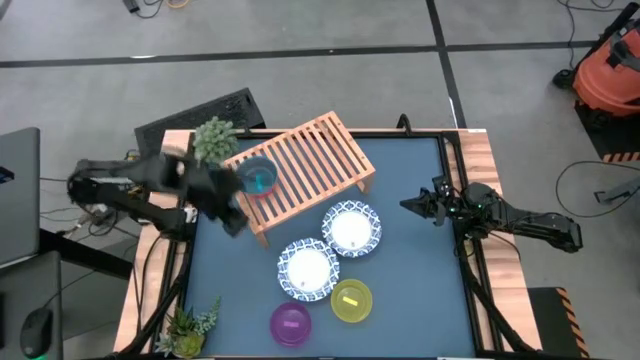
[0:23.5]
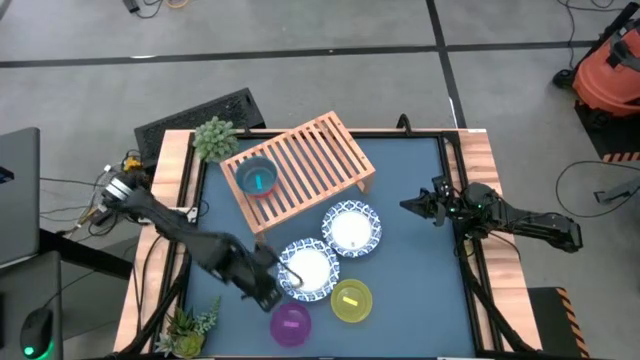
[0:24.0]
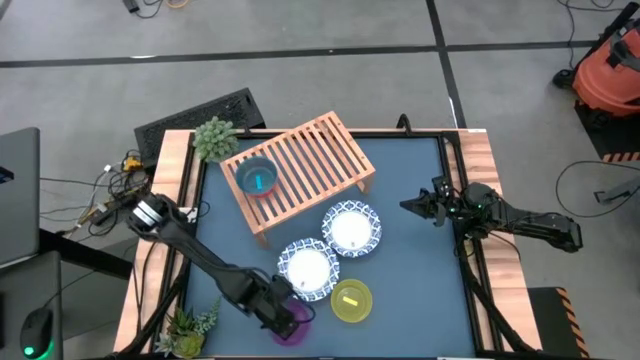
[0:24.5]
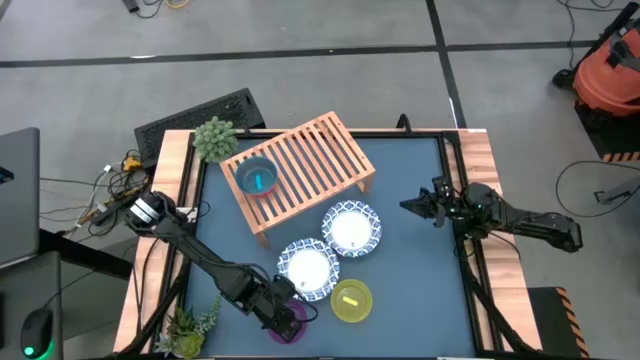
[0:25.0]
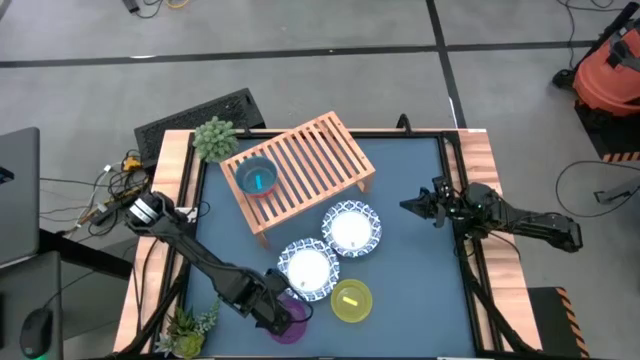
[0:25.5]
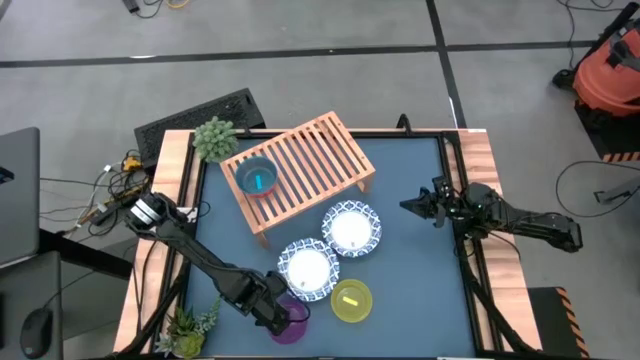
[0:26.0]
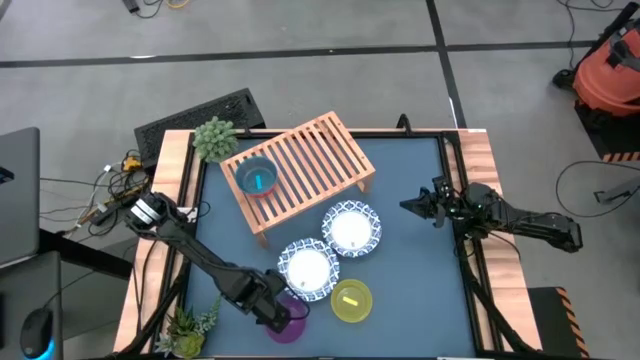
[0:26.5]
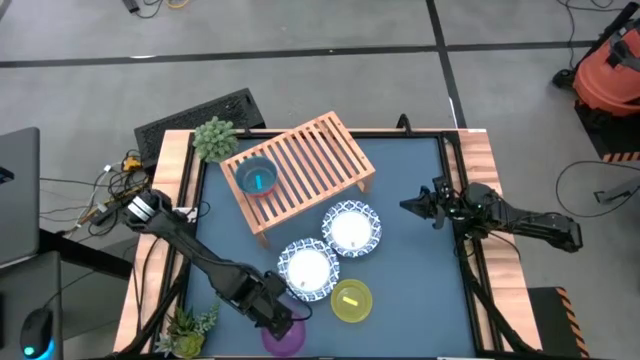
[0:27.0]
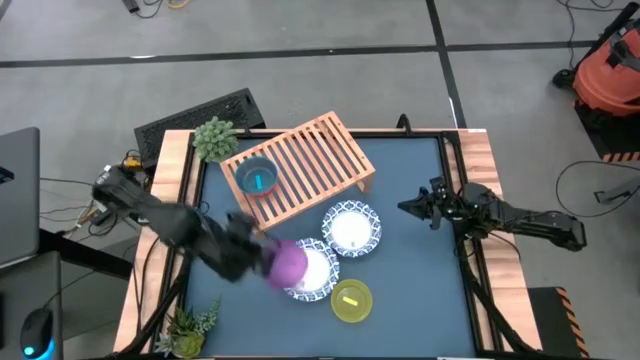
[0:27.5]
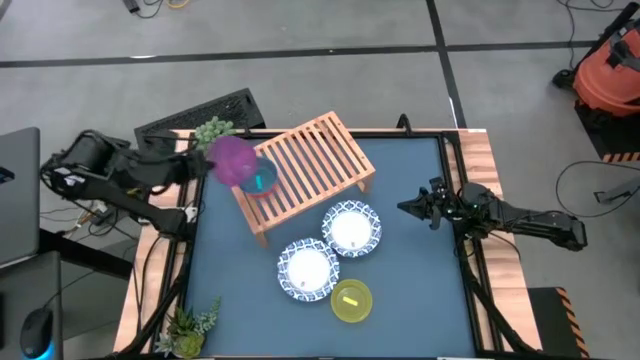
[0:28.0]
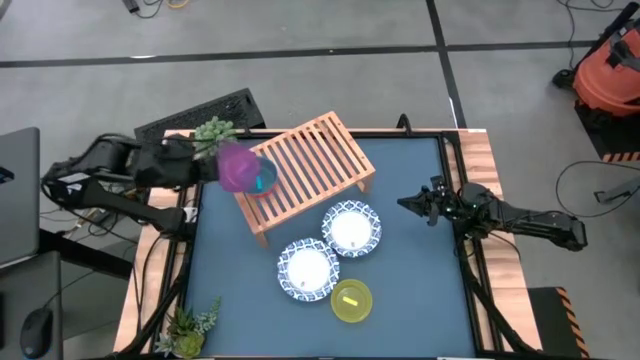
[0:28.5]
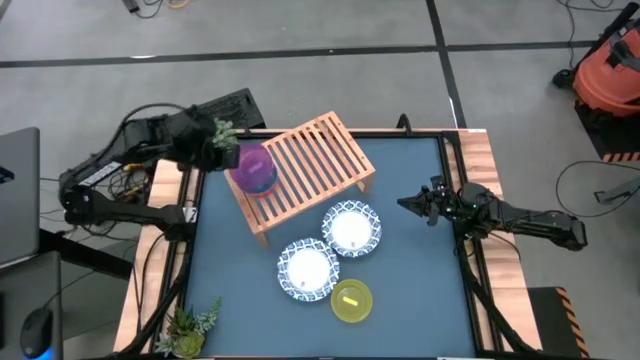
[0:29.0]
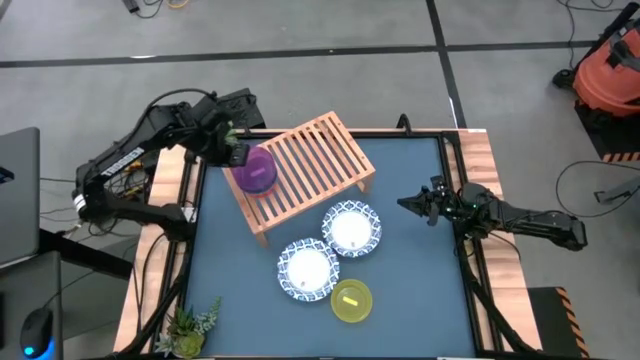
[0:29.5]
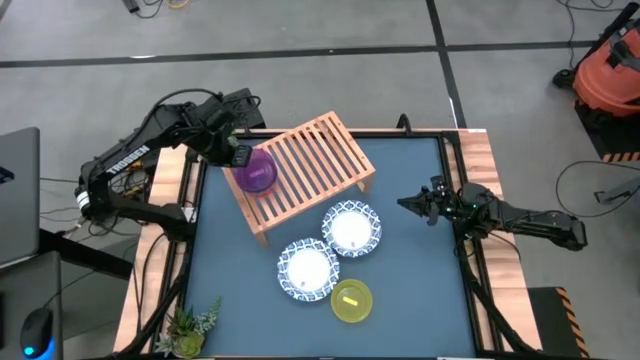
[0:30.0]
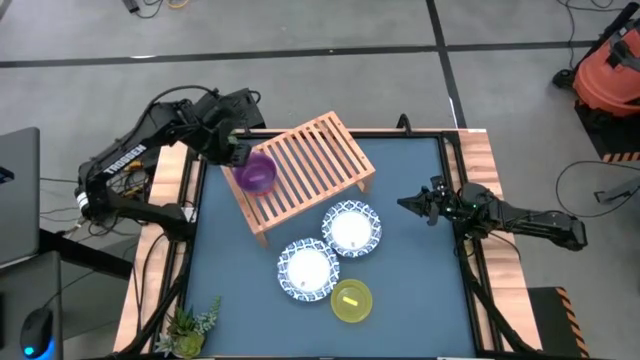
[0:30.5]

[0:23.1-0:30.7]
Task: Place and stack bowls onto a shelf
Stack the purple bowl into the blue bowl on the shelf

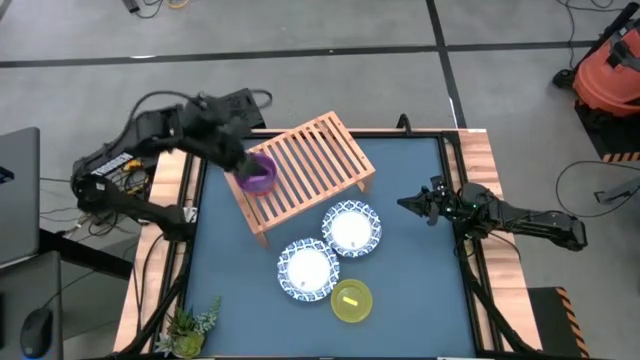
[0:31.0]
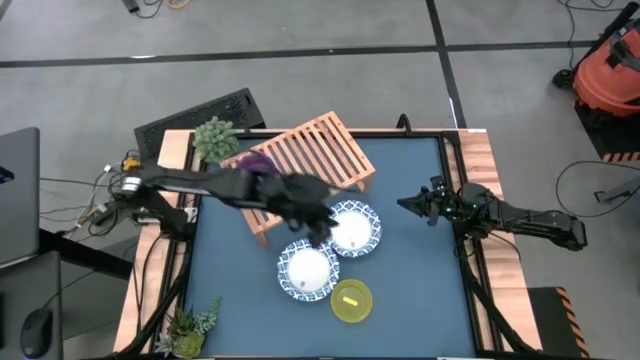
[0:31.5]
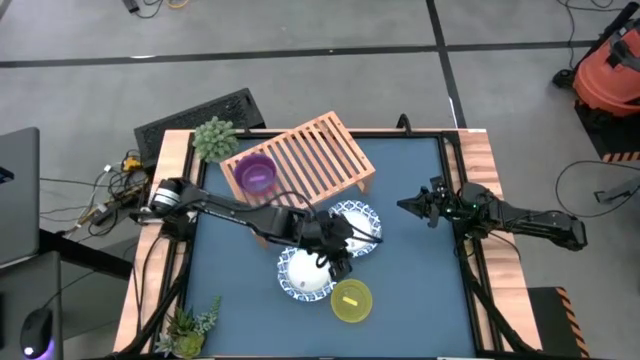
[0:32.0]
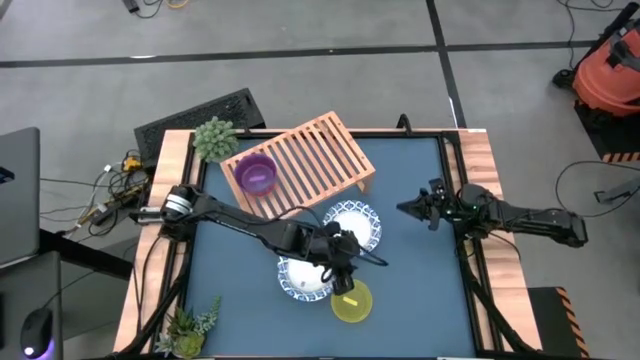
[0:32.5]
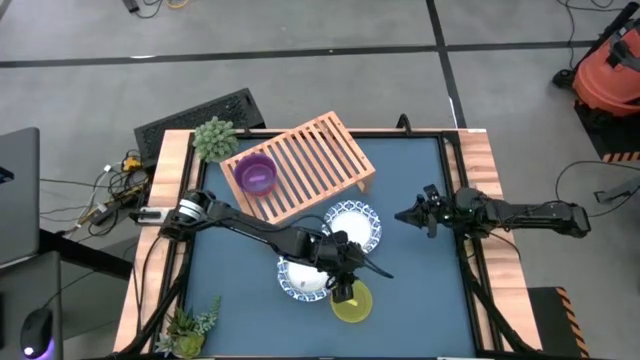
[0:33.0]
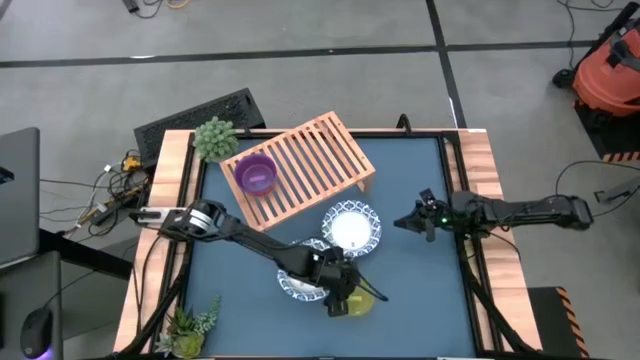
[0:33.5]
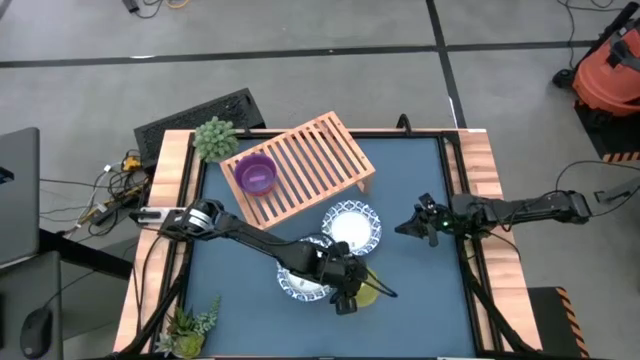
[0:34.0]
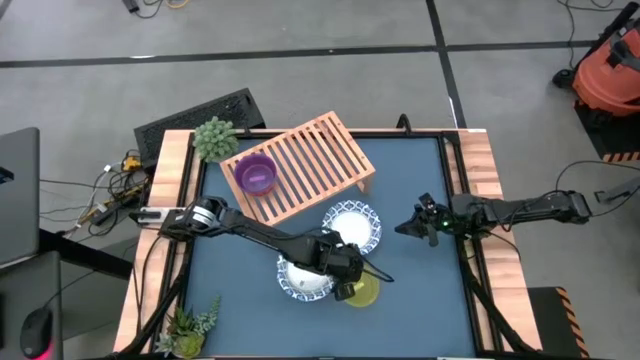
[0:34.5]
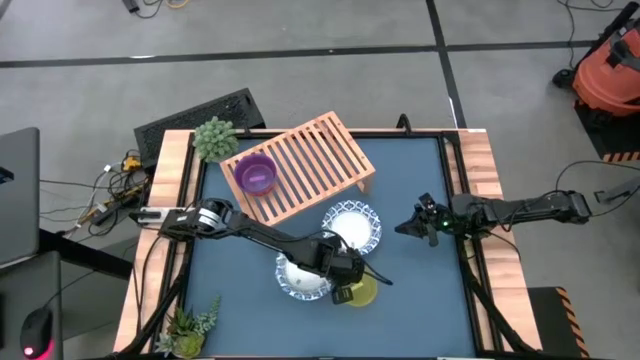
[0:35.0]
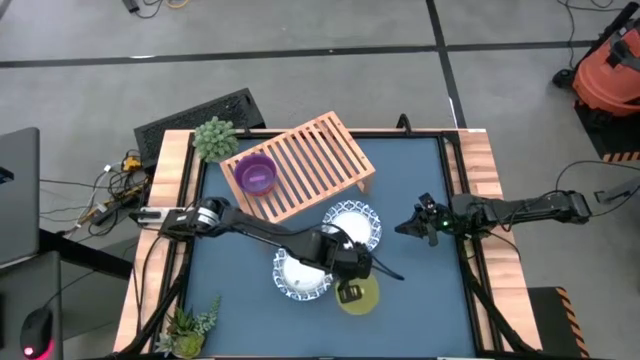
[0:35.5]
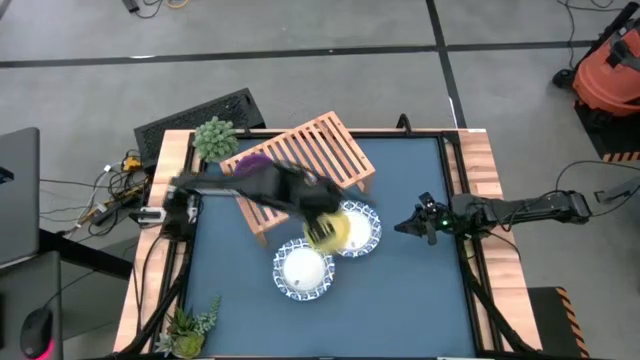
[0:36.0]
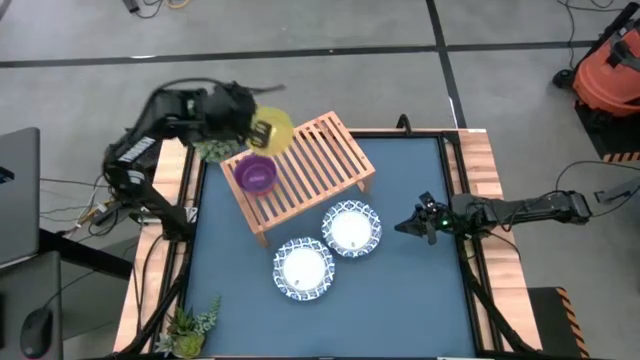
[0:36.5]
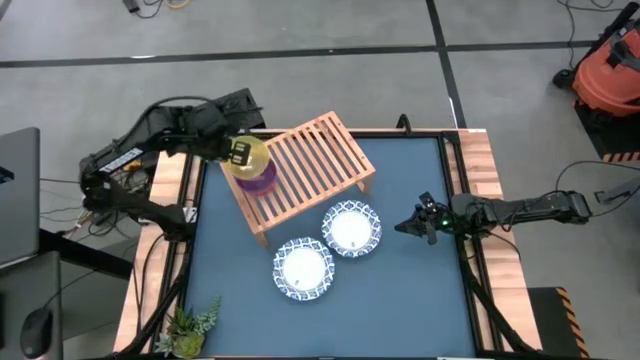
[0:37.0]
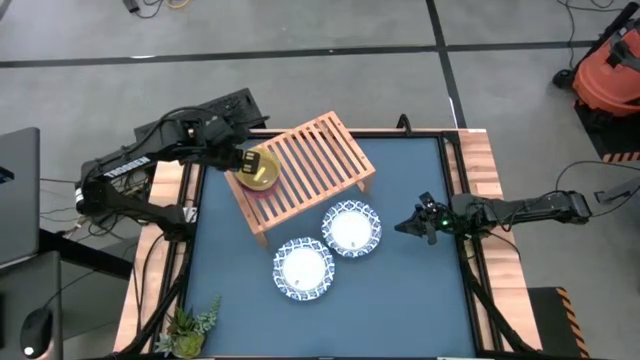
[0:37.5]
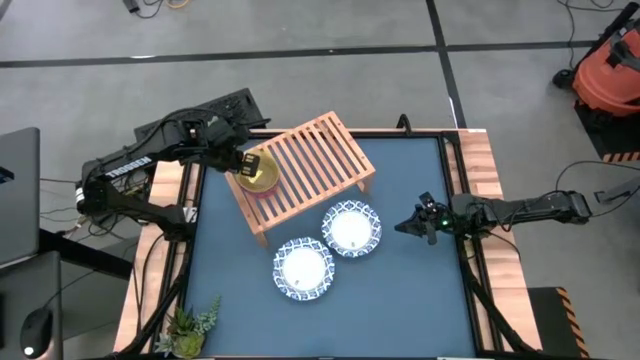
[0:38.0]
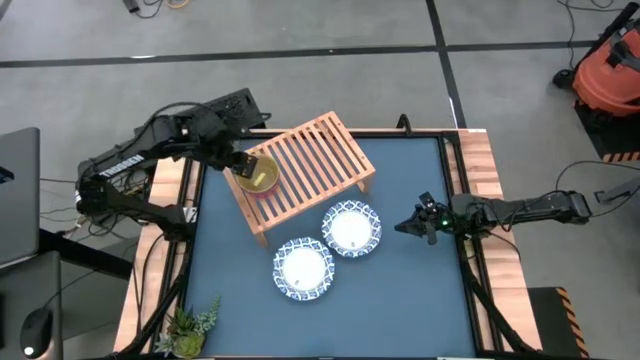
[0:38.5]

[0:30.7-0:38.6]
Stack the yellow bowl into the purple bowl on the shelf

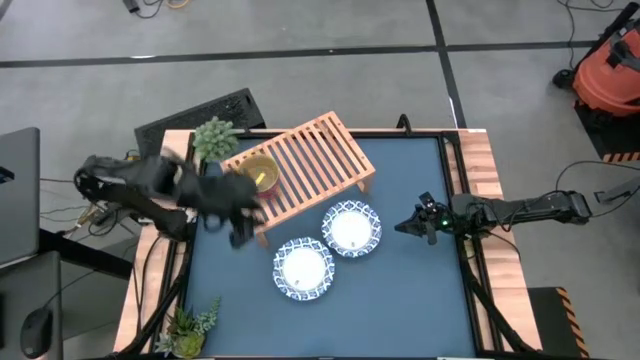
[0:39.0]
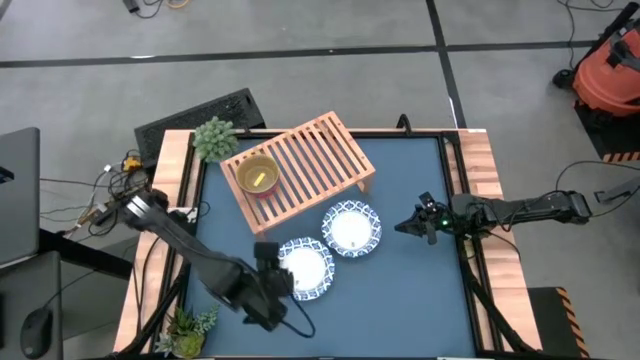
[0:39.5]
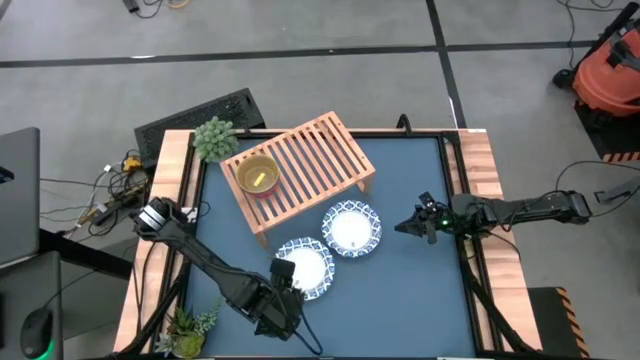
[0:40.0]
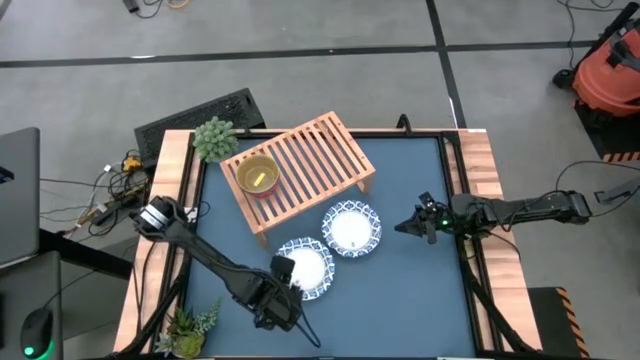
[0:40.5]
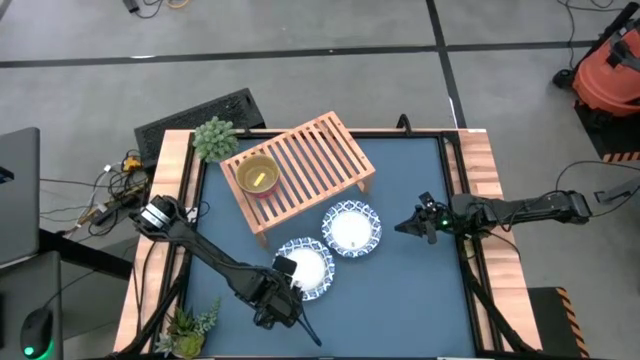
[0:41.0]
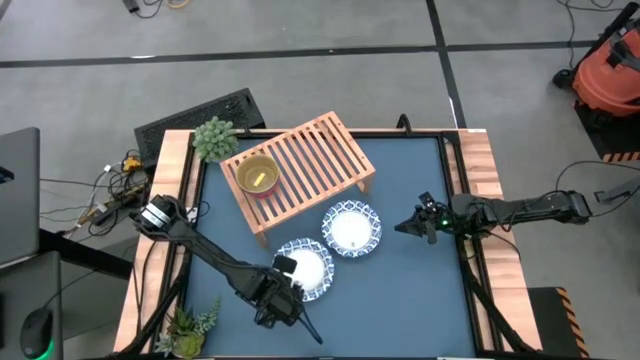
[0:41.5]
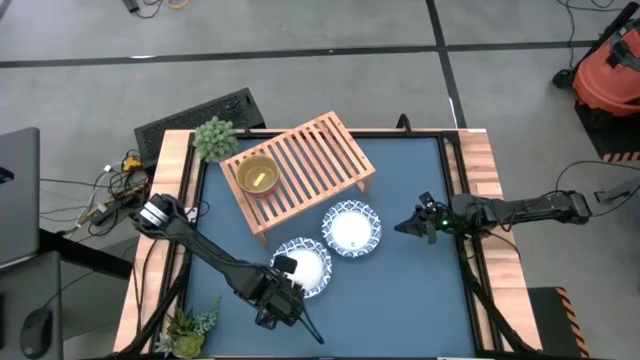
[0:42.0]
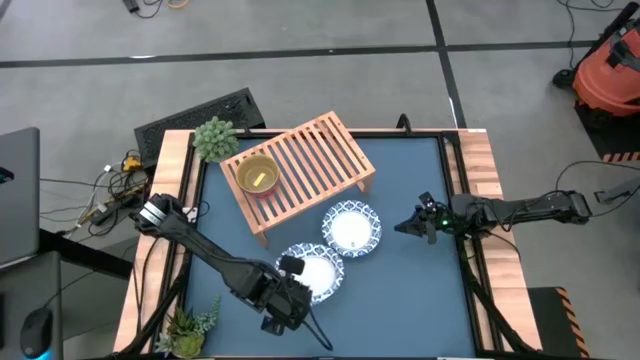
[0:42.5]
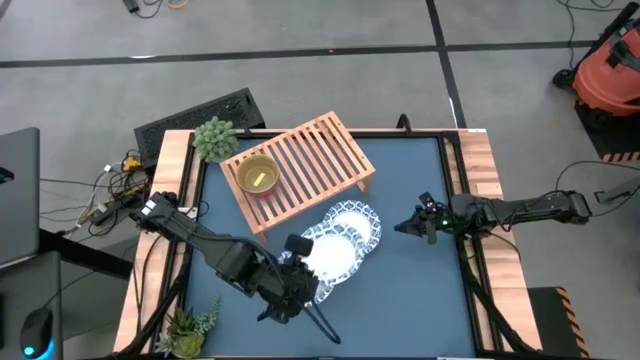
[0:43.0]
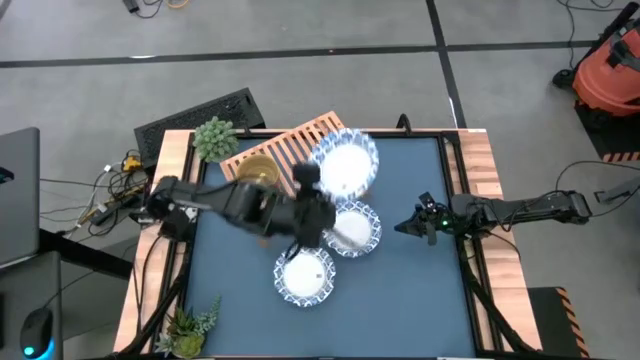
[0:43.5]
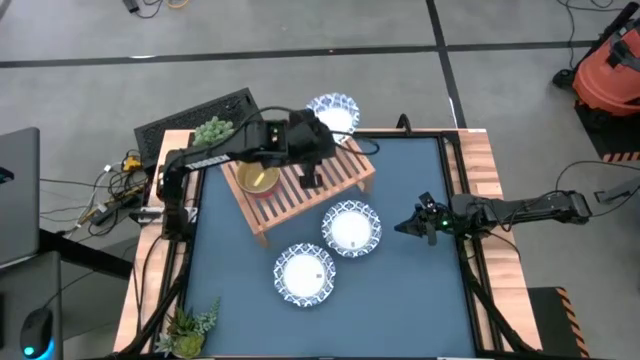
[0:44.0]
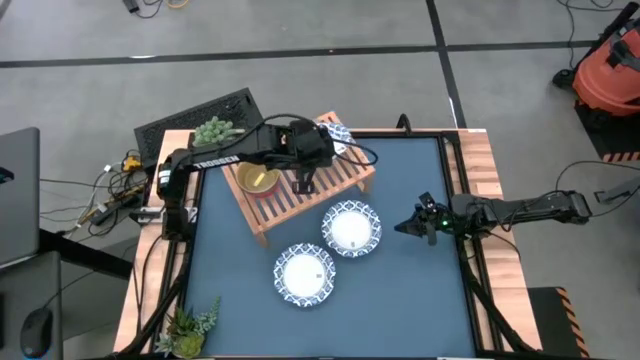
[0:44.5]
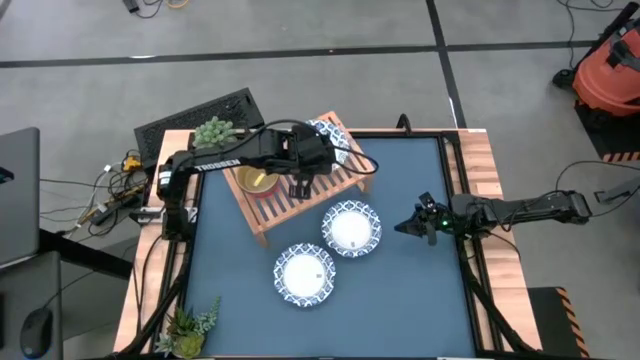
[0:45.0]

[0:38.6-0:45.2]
Put the left white bowl on the shelf
